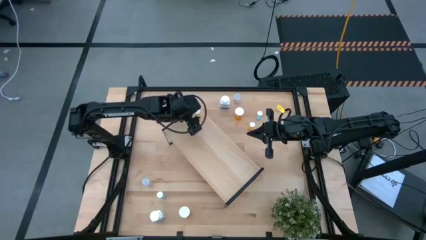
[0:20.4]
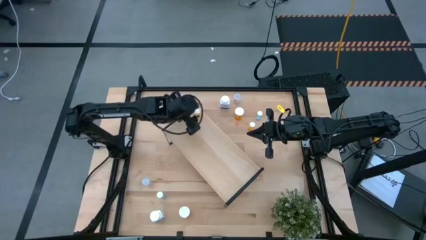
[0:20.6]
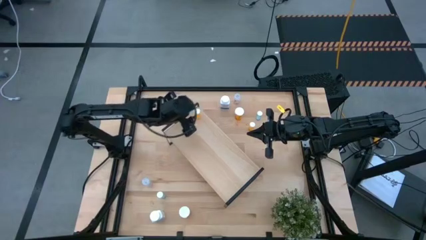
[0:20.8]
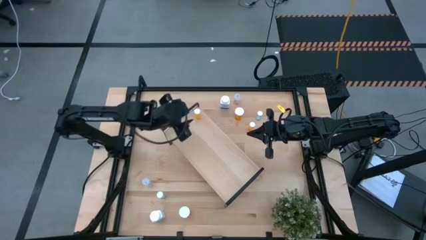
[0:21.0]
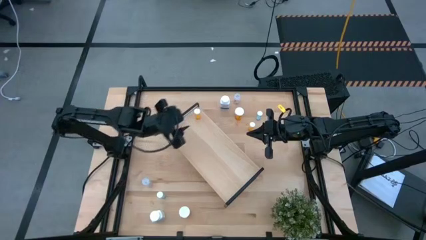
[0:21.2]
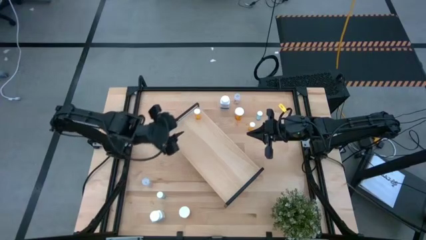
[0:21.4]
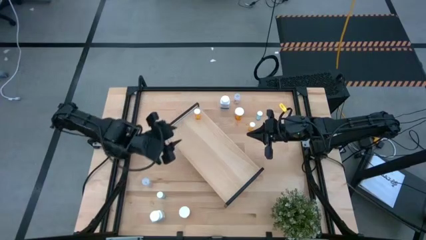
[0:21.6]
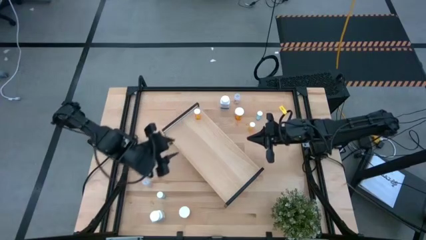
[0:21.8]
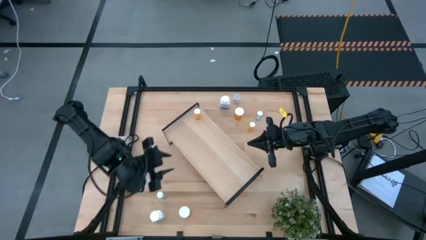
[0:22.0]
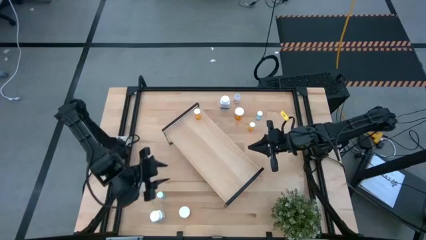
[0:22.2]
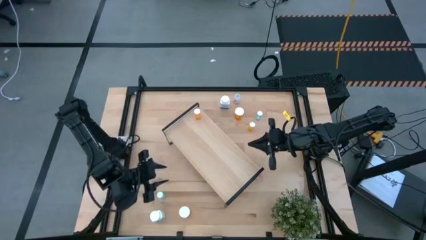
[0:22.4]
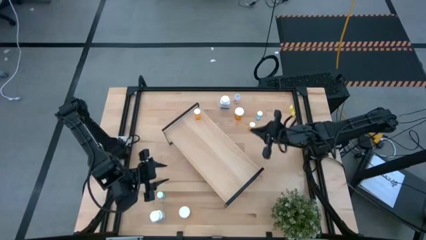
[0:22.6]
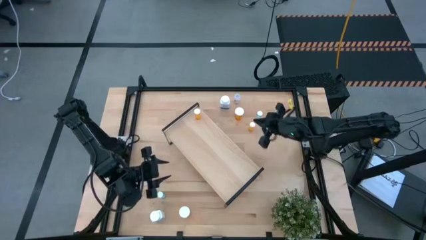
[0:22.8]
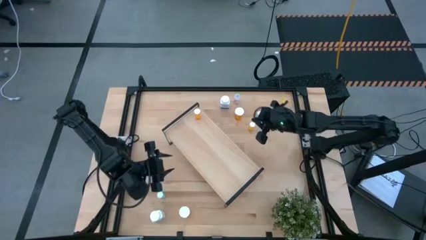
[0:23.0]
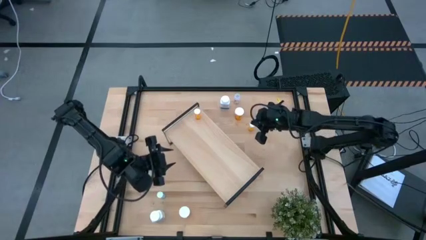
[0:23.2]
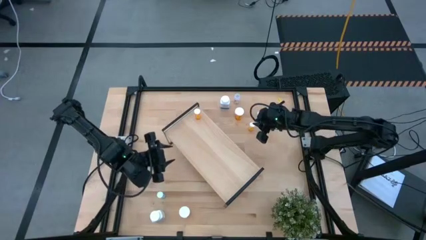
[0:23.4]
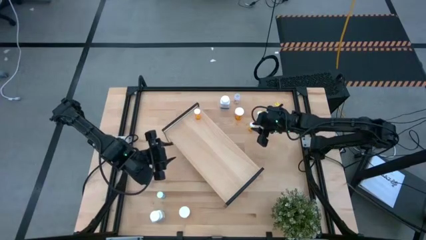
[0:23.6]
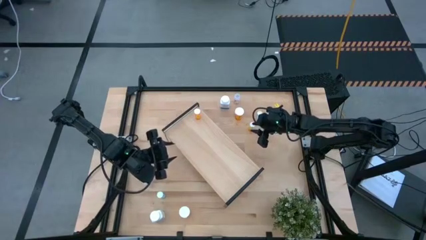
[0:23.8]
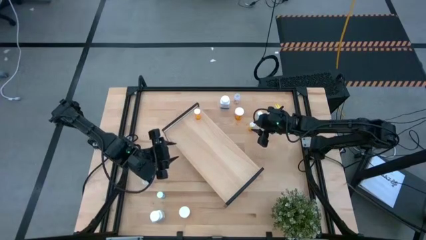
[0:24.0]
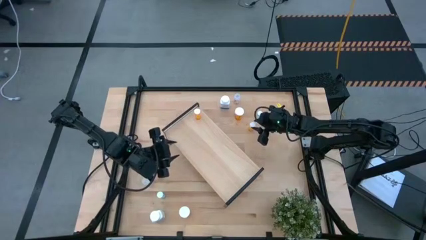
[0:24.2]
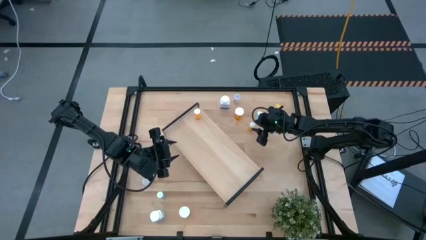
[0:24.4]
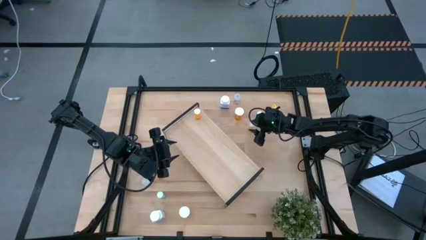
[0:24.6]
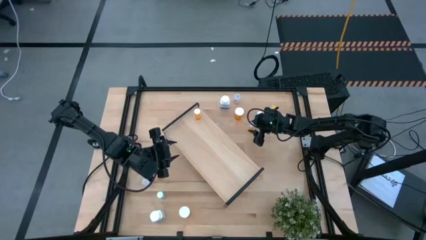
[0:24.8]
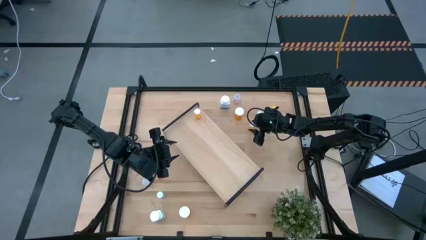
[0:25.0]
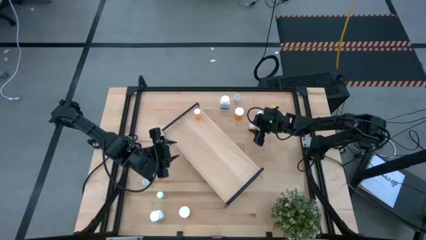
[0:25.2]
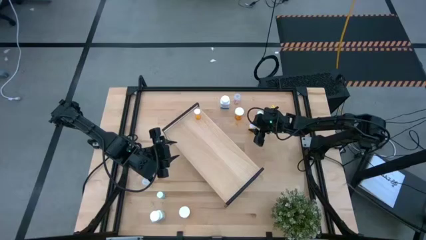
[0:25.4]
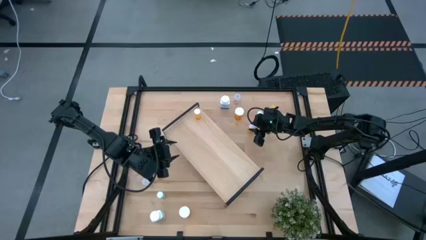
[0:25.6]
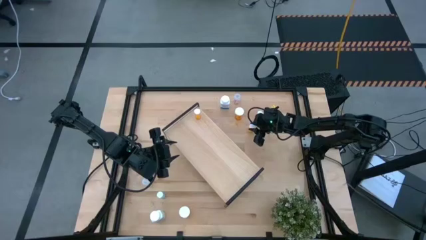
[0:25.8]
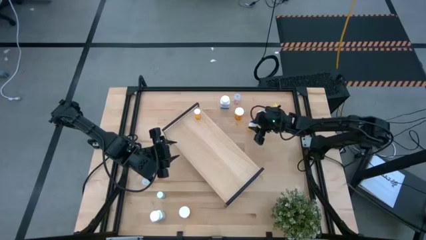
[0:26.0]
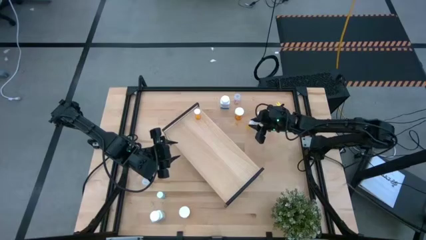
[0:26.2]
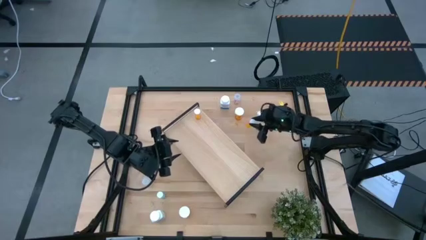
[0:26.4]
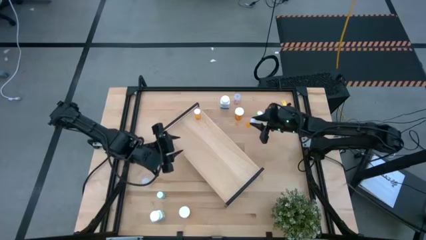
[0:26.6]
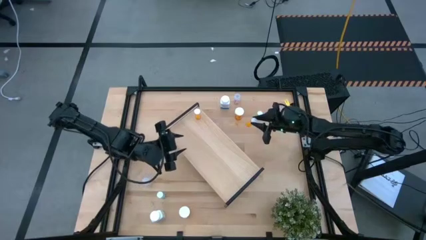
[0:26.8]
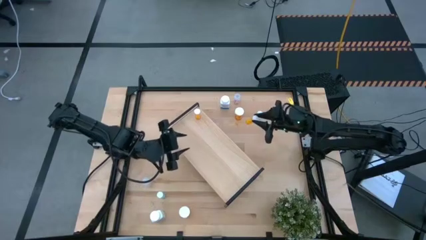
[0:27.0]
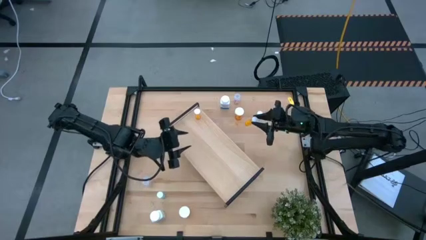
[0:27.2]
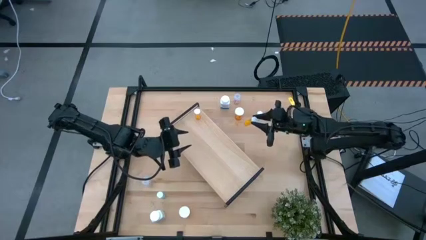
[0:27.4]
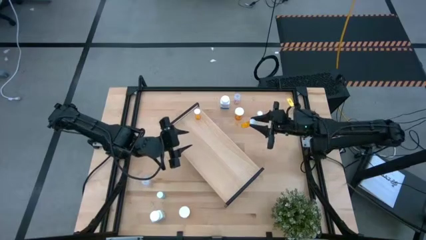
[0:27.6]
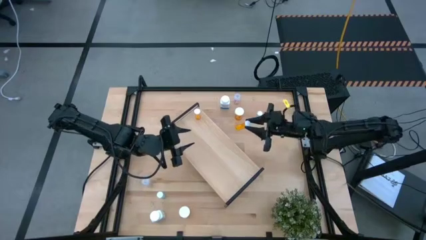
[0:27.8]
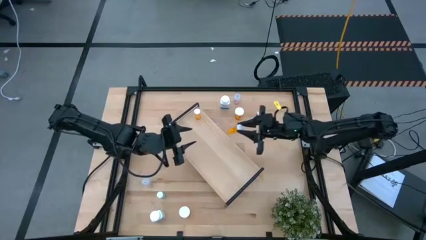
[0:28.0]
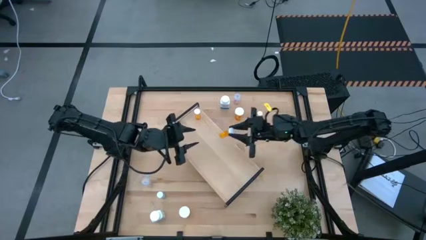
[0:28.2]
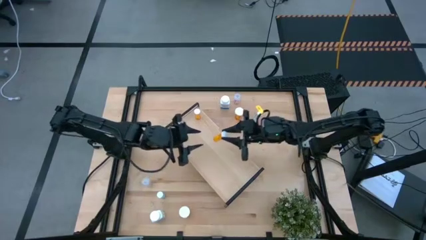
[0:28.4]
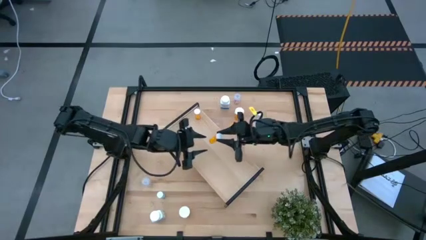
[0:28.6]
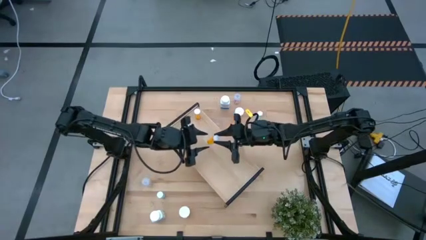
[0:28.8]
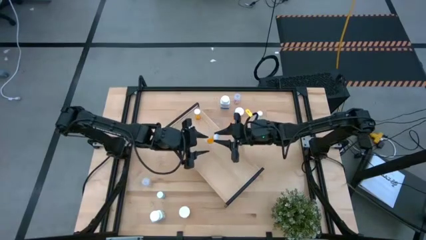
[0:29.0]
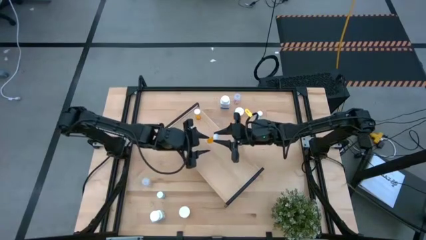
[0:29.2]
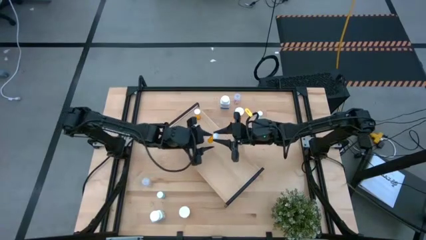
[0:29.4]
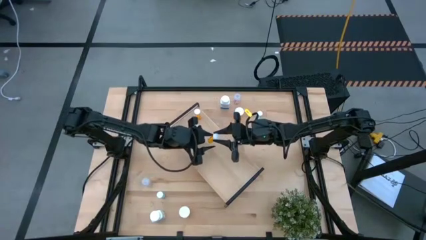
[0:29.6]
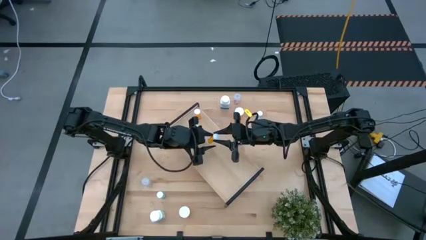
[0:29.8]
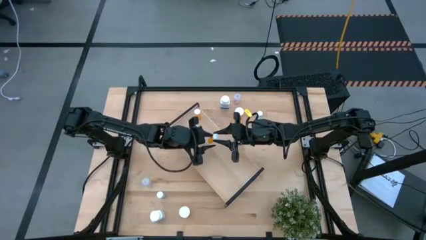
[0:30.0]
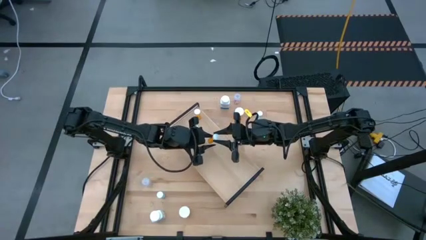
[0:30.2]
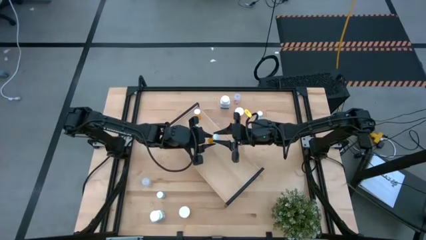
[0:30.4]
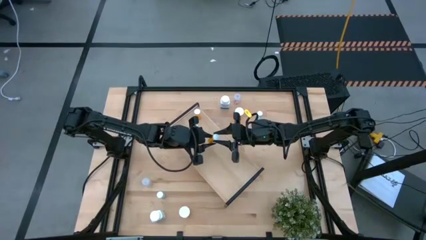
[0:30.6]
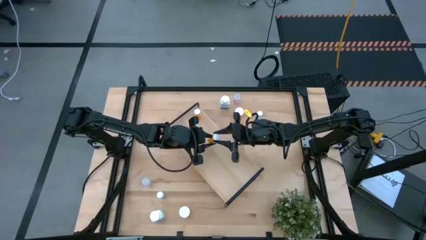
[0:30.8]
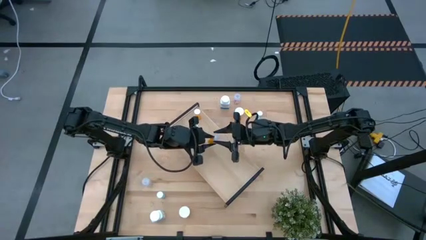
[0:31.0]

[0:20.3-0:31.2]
Task: Pick and place medicine bottles onto shelf by color
Put the small orange pill bottle on the shelf aligned with the small orange pill bottle
